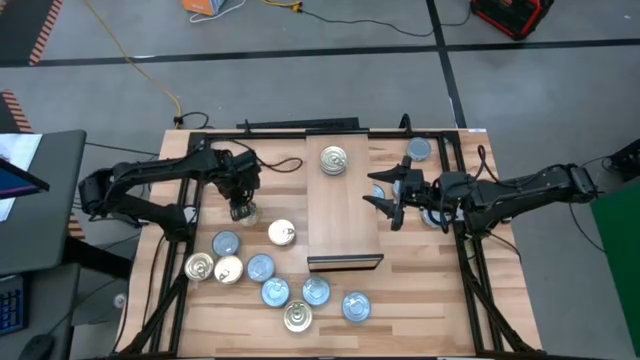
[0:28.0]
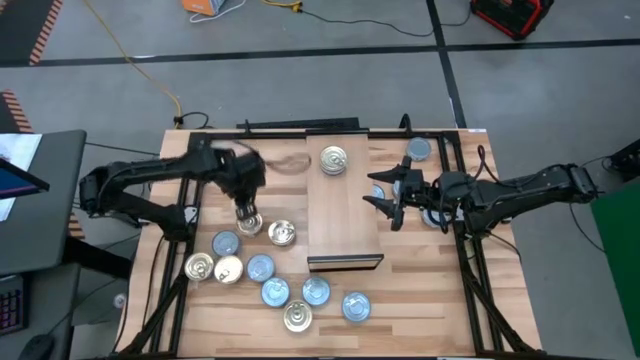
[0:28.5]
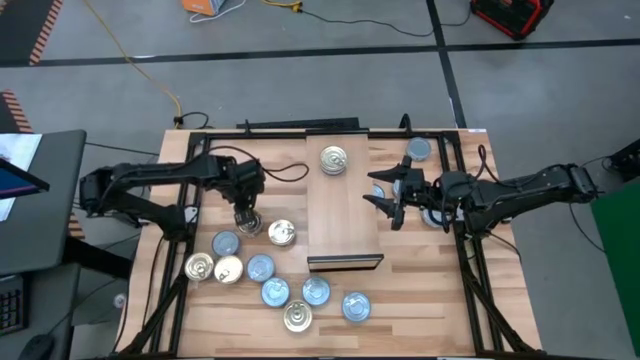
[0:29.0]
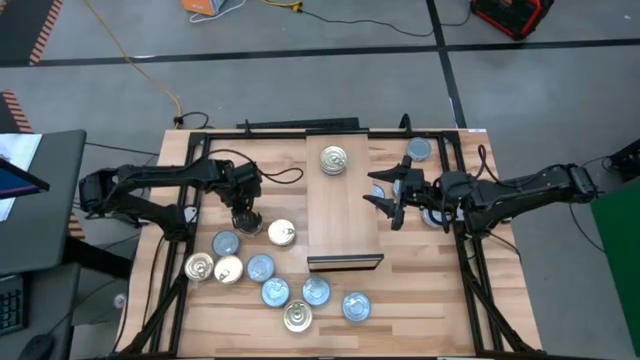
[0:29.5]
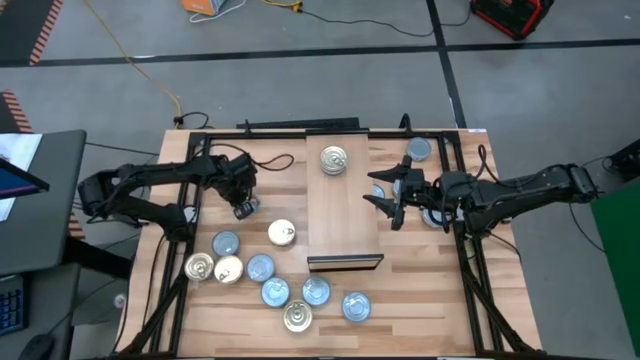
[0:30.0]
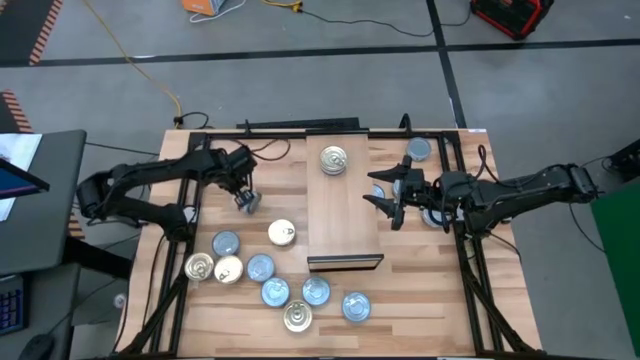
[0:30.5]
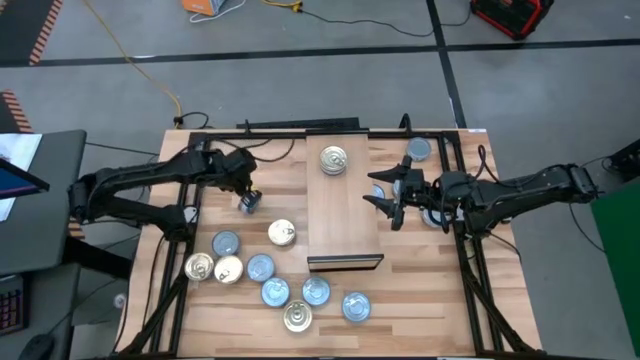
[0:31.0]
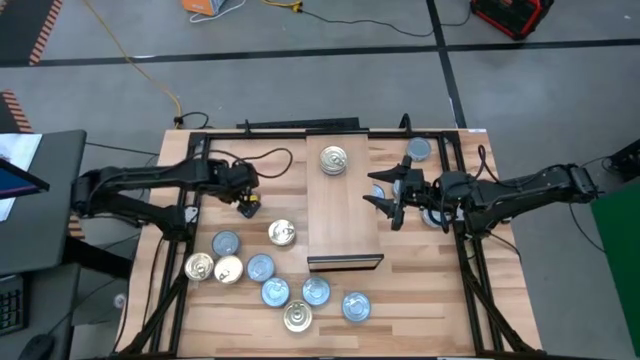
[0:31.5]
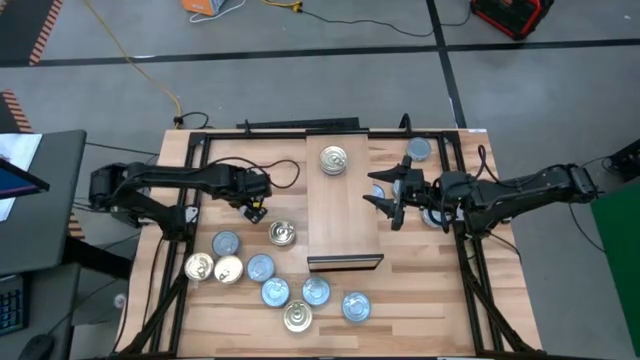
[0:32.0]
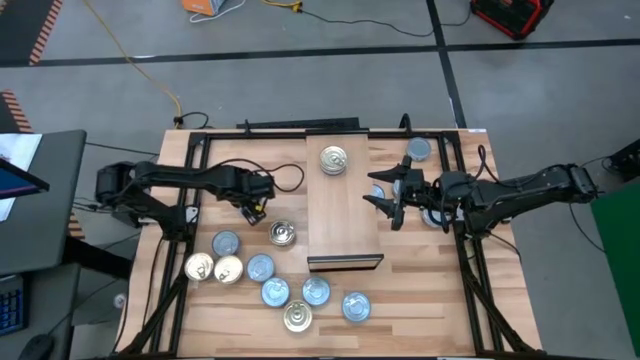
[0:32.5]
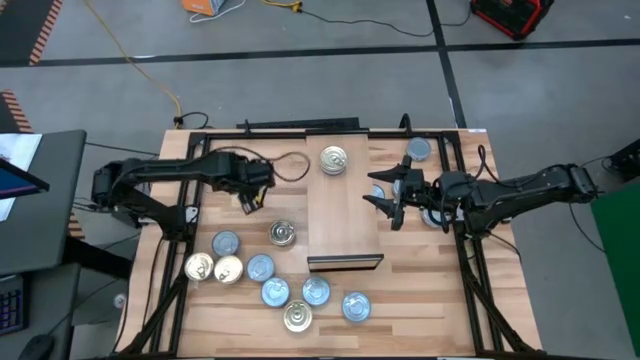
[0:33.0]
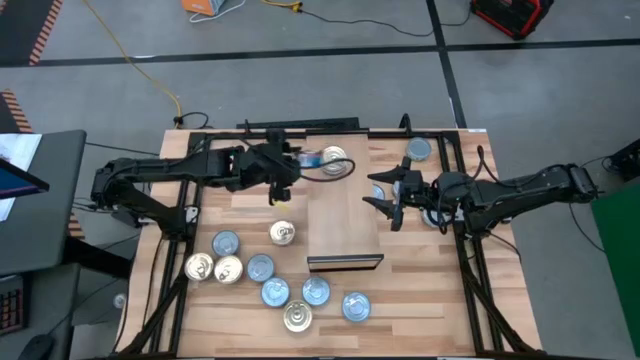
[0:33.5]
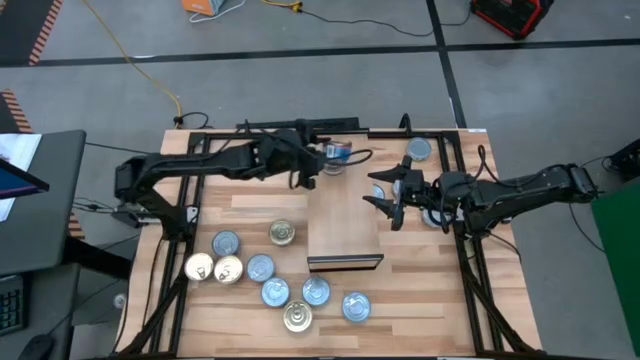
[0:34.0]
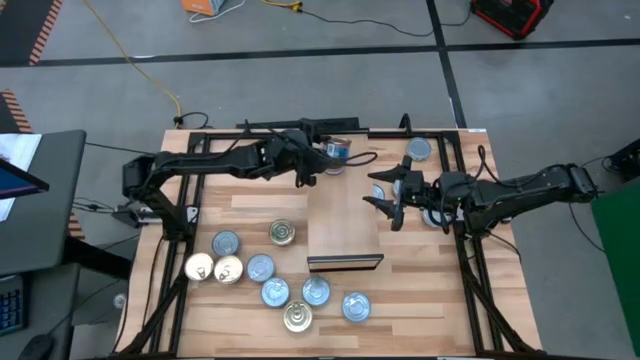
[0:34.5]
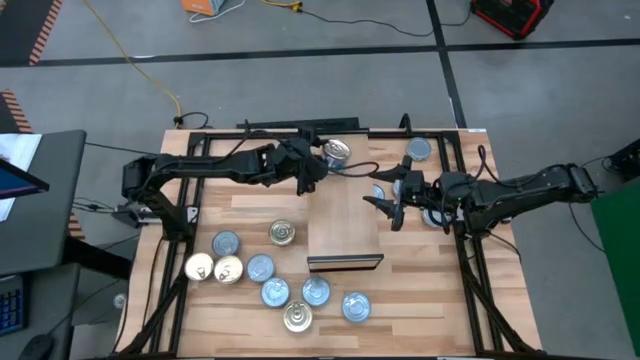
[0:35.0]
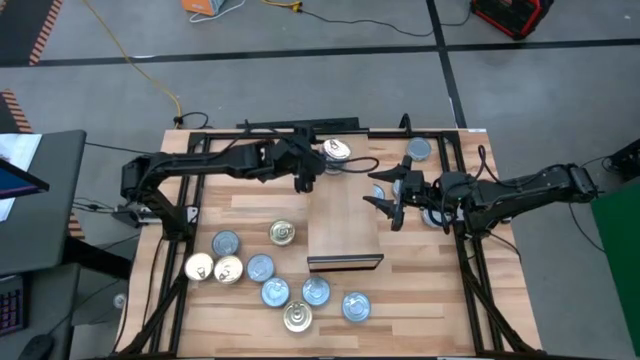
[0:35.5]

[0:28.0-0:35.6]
Task: Stack canned seafood by type on shelf
Stack the blue and pink tuna can on the shelf on top of the other blue and pink tuna can

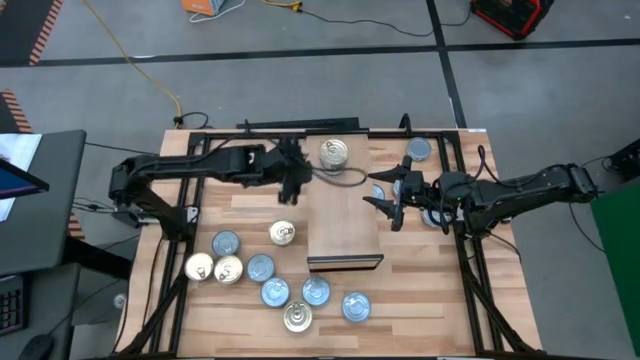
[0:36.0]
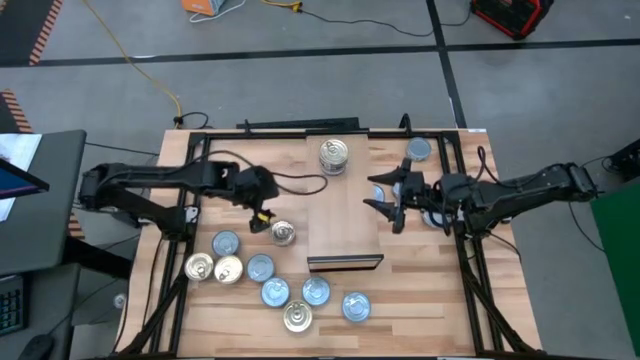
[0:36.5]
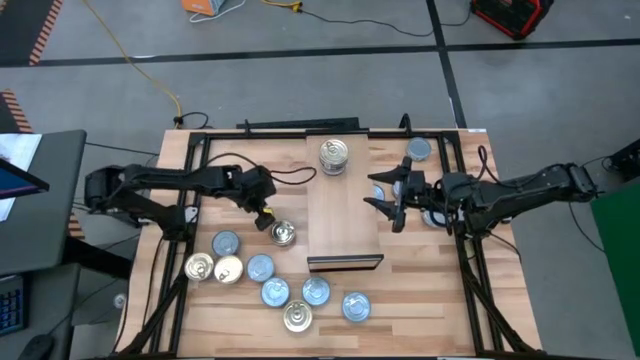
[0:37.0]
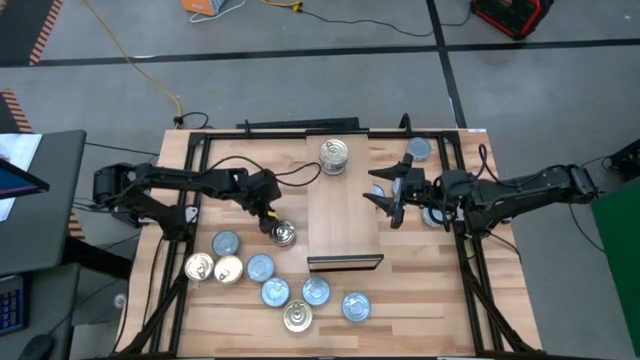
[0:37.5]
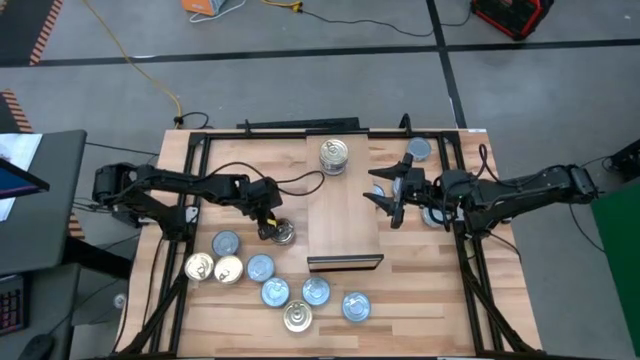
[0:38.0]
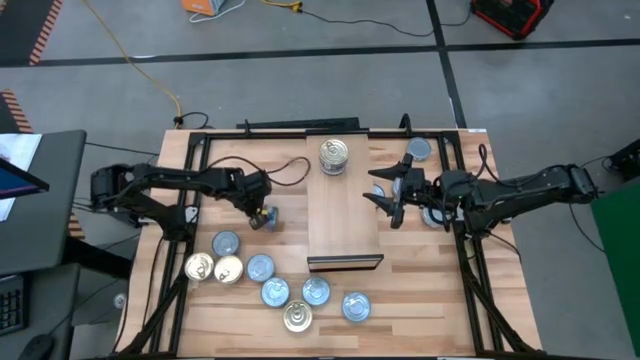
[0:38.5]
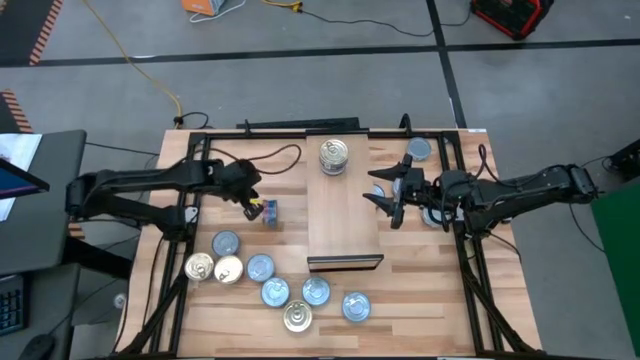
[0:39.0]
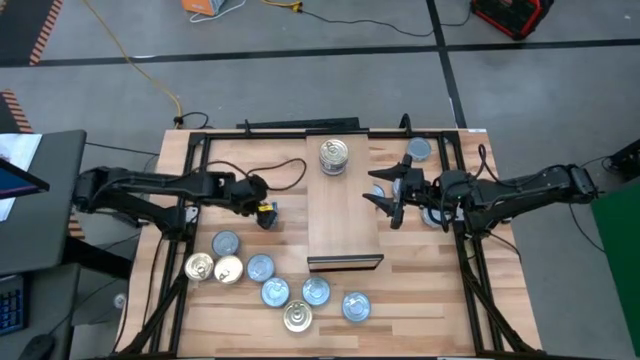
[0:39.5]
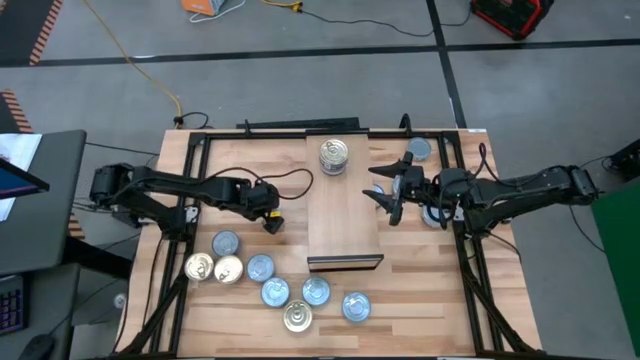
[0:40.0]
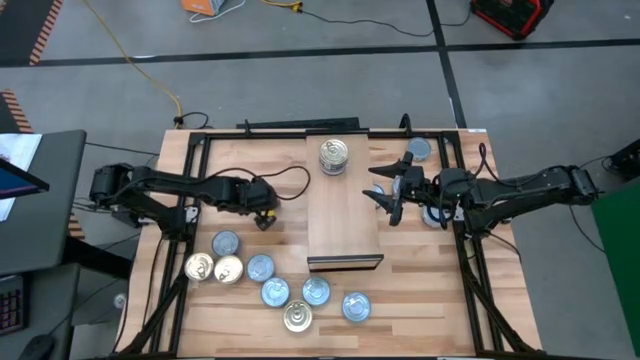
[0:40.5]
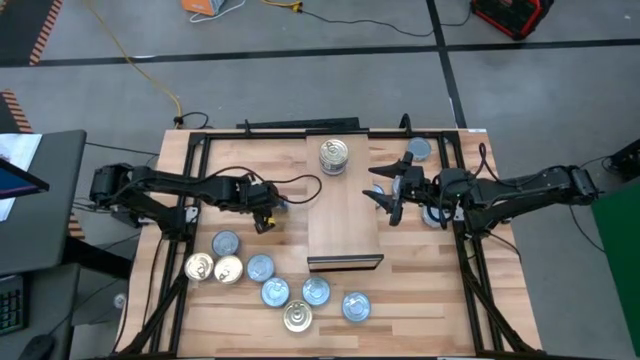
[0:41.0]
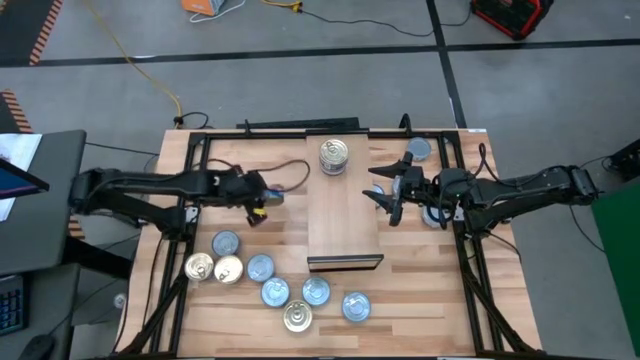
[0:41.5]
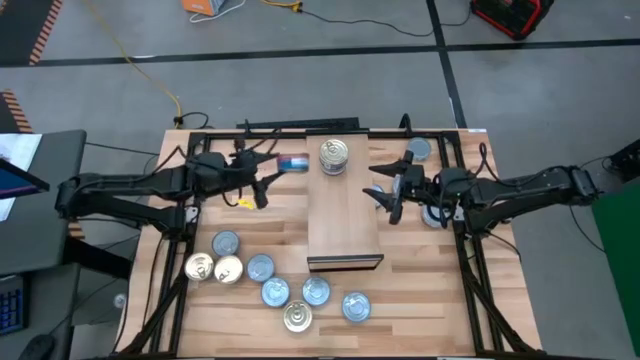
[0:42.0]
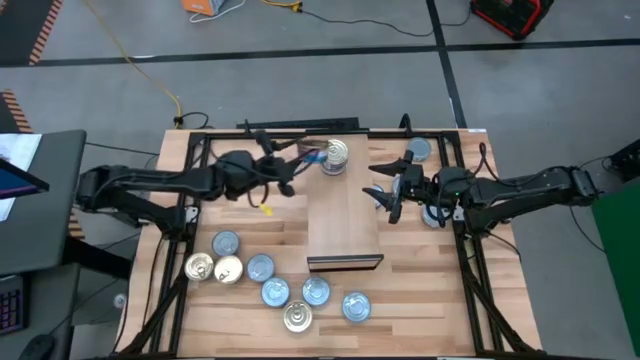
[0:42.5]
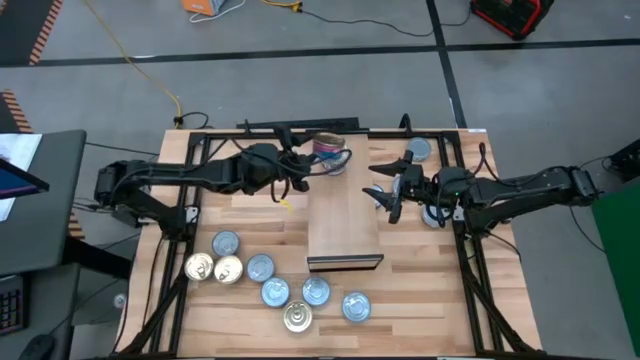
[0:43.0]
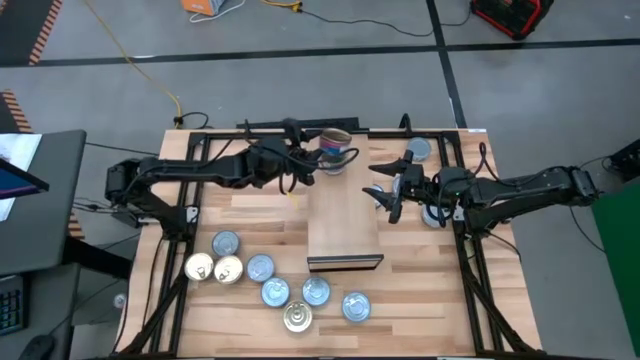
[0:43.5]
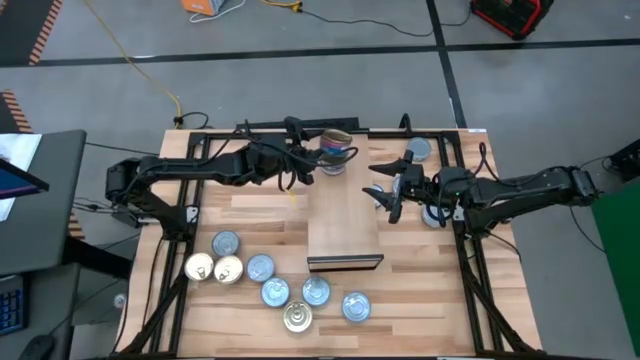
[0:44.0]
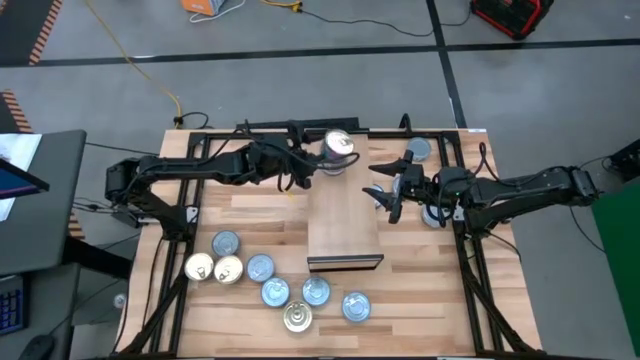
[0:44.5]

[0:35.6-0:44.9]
Stack the blue and pink tuna can on the shelf on top of the other blue and pink tuna can

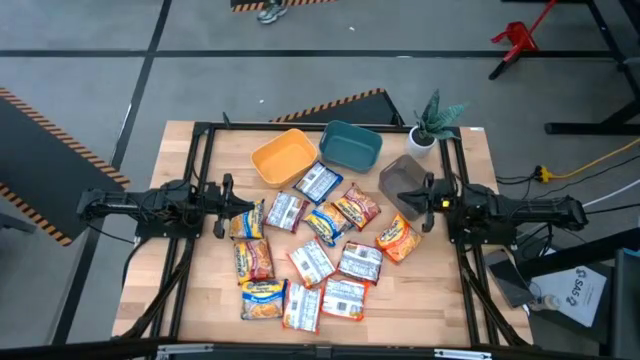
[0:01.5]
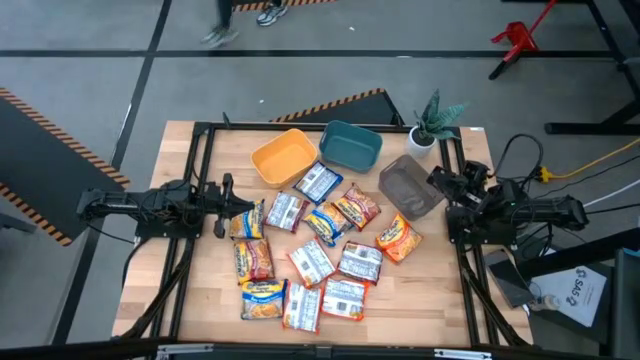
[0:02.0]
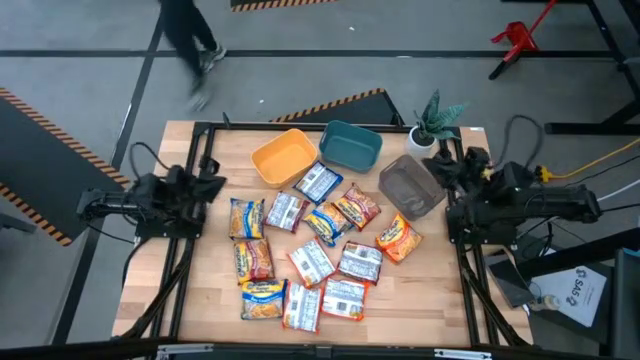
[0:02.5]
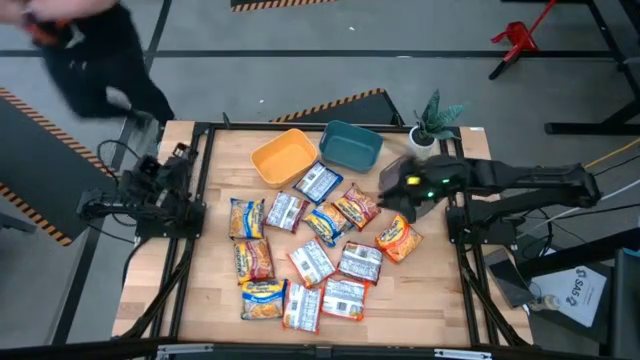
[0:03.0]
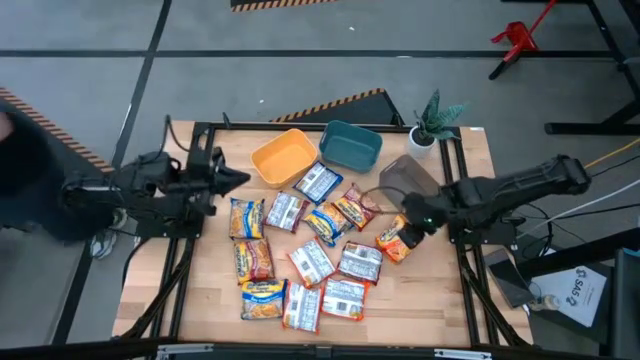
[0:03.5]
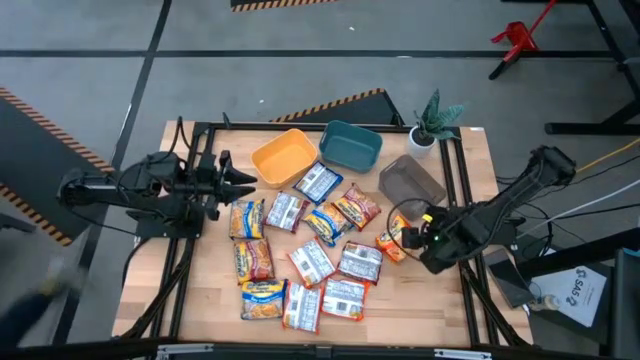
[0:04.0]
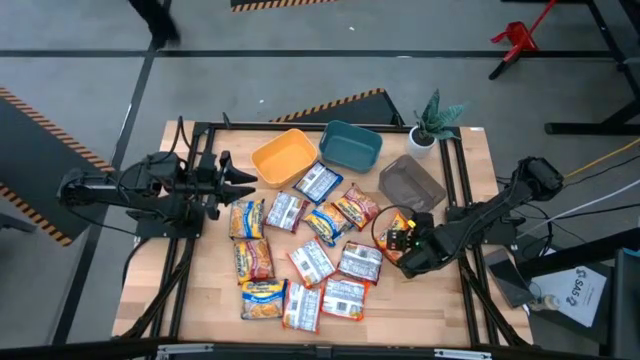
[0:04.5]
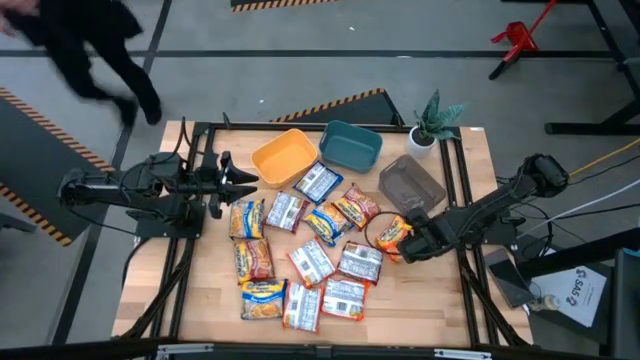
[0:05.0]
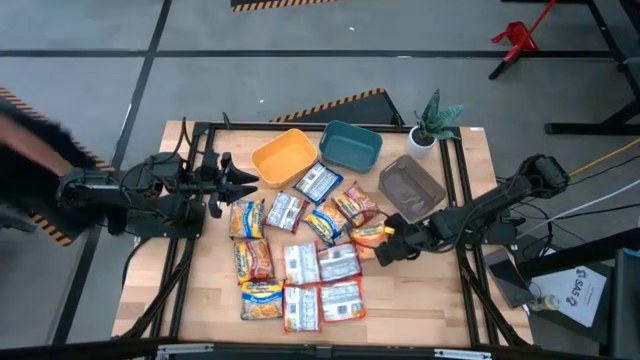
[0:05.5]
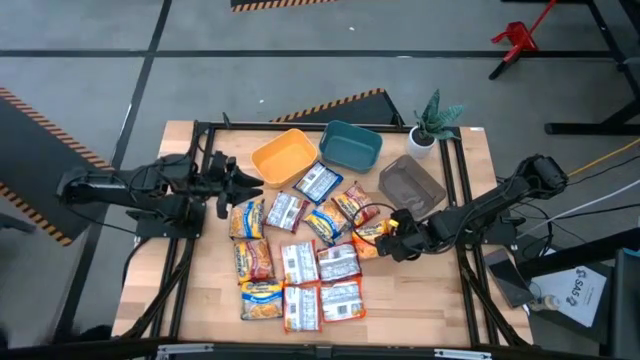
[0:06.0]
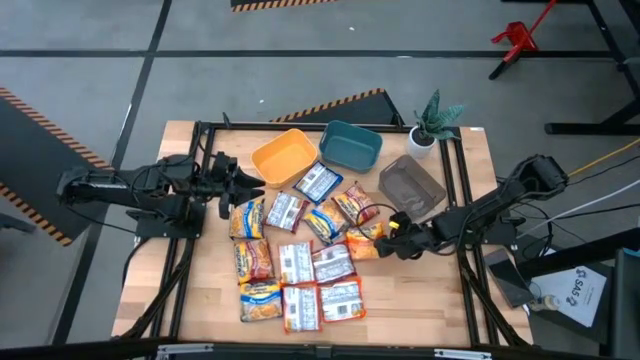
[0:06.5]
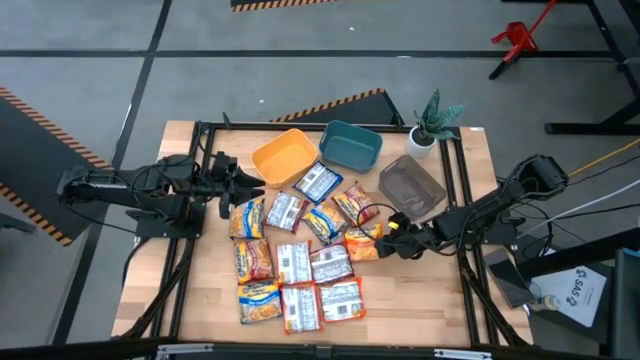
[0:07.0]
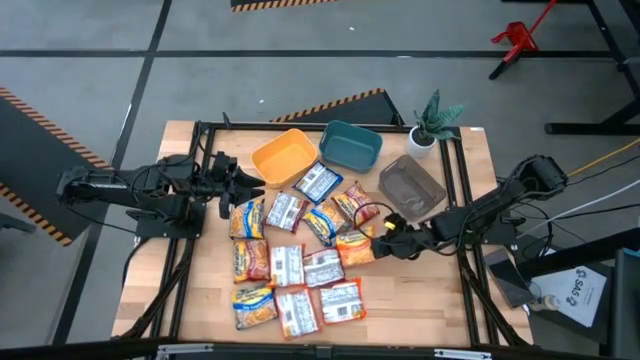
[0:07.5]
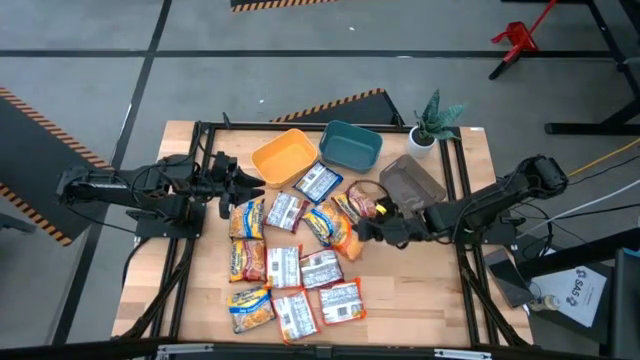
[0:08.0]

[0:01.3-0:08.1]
Task: Sort Maruchan noodles
Put the top right orange noodle pack into the black bin
